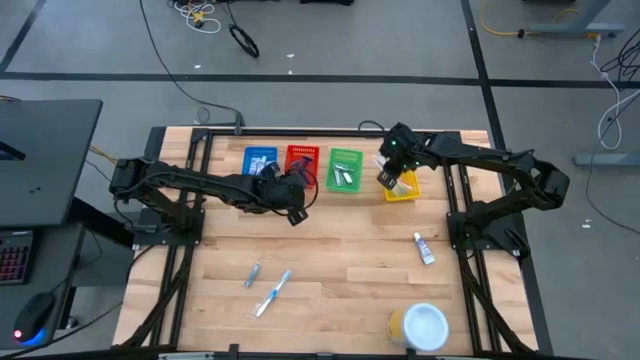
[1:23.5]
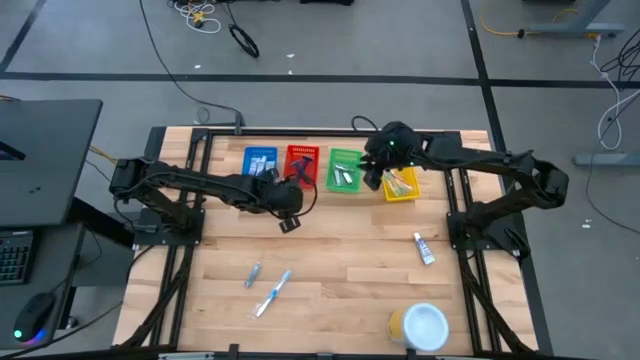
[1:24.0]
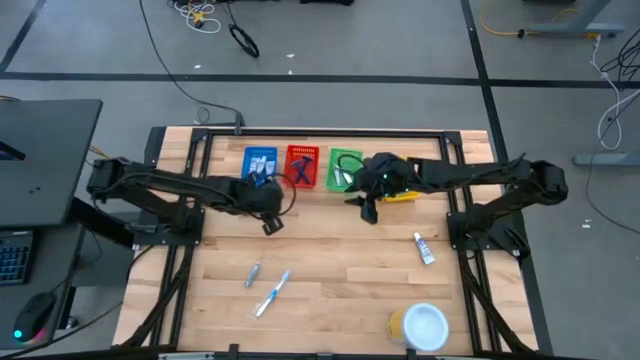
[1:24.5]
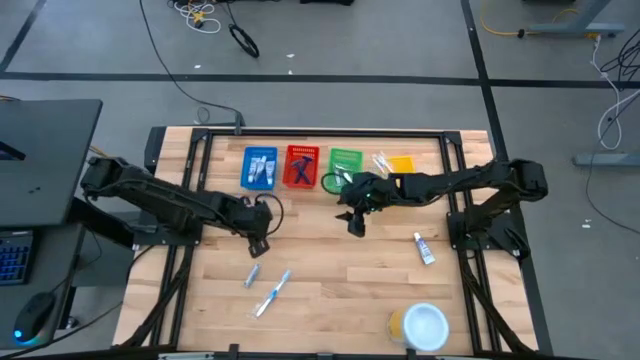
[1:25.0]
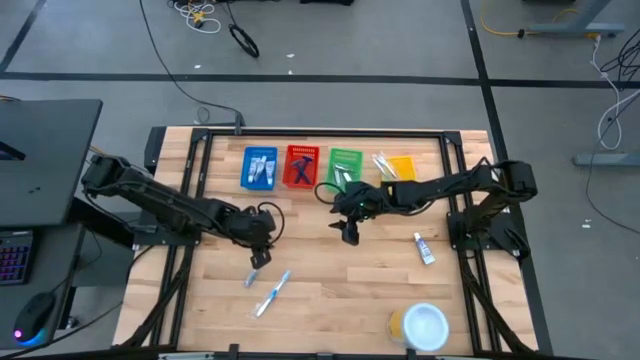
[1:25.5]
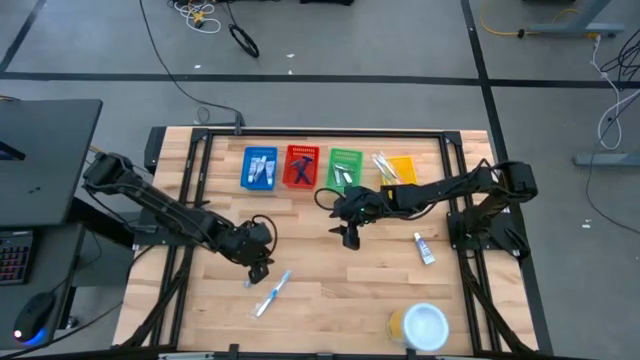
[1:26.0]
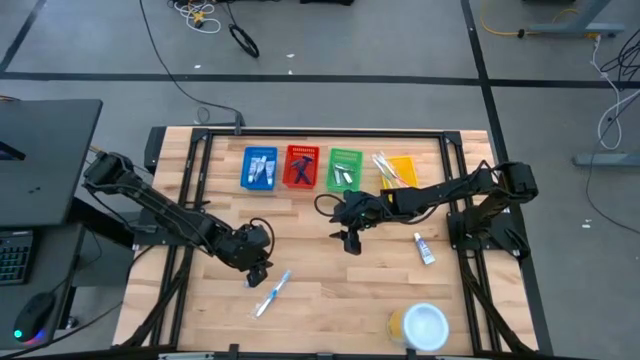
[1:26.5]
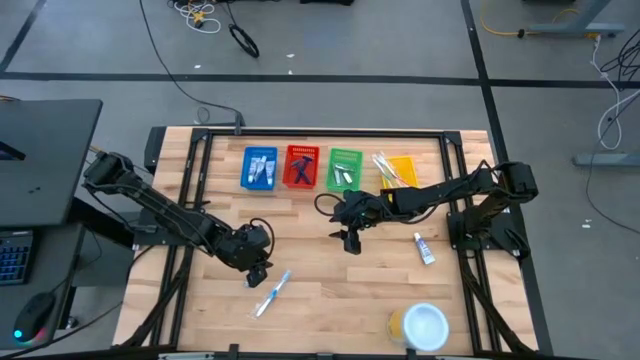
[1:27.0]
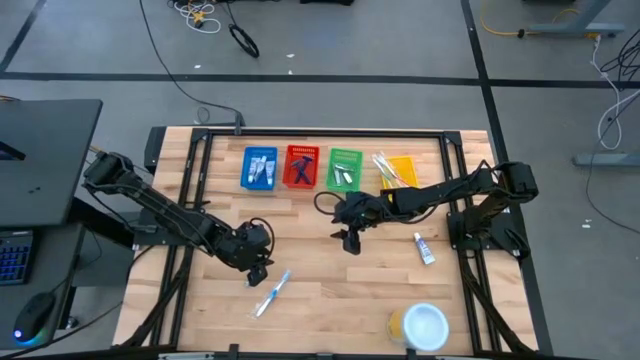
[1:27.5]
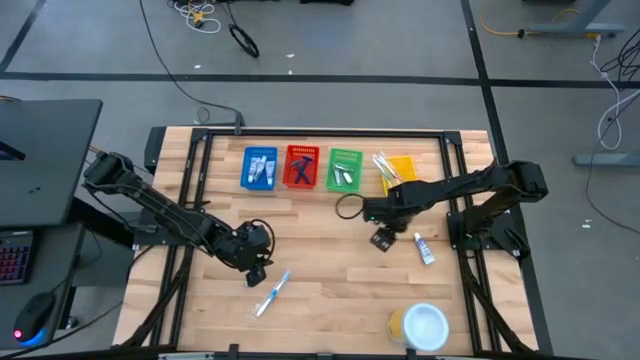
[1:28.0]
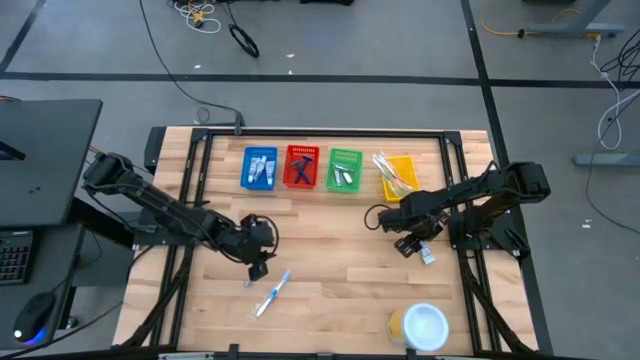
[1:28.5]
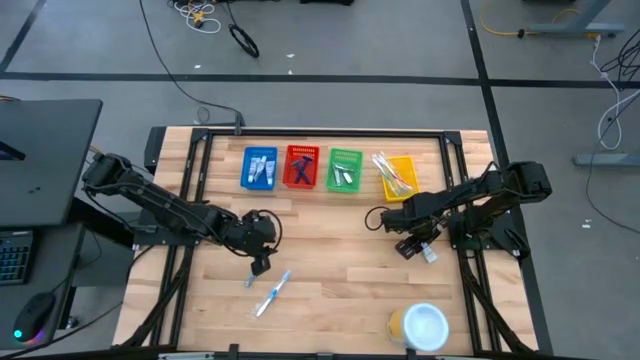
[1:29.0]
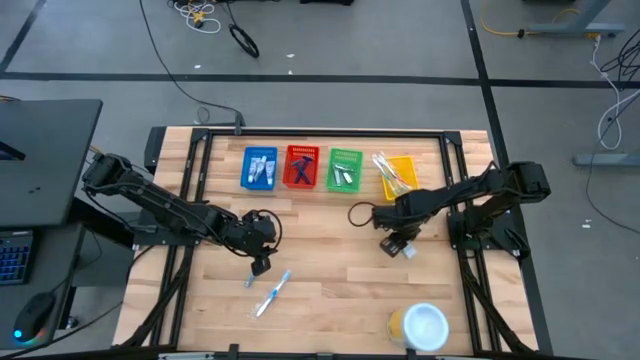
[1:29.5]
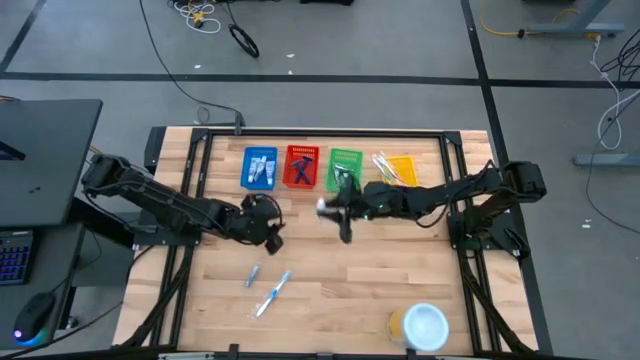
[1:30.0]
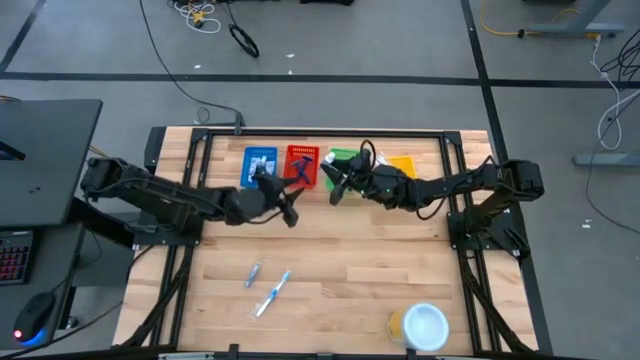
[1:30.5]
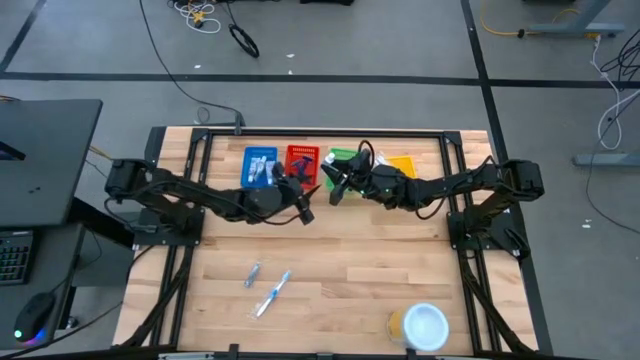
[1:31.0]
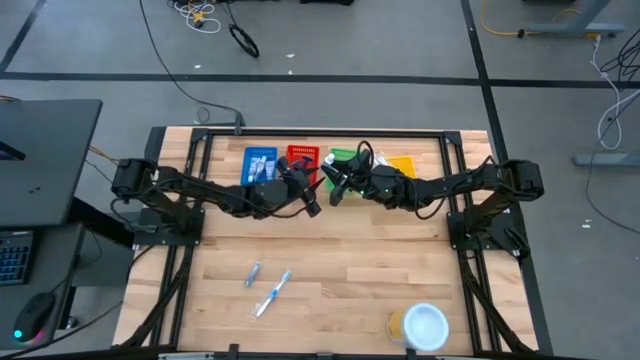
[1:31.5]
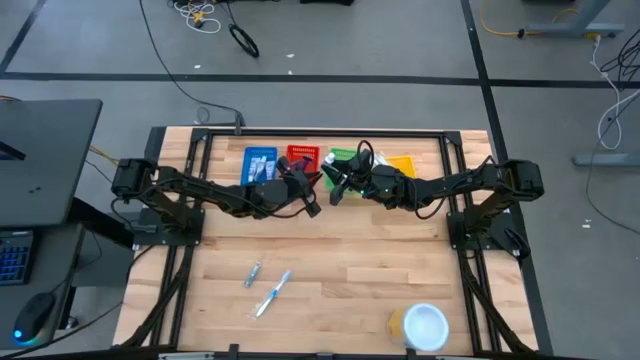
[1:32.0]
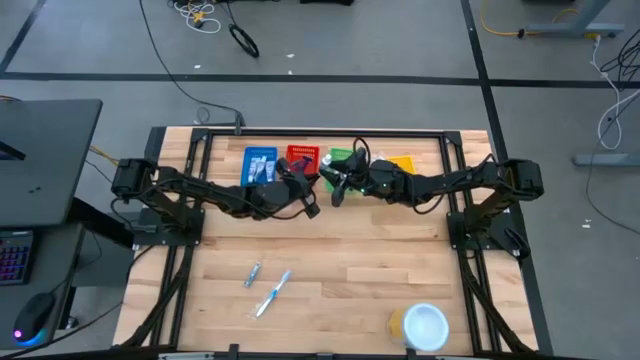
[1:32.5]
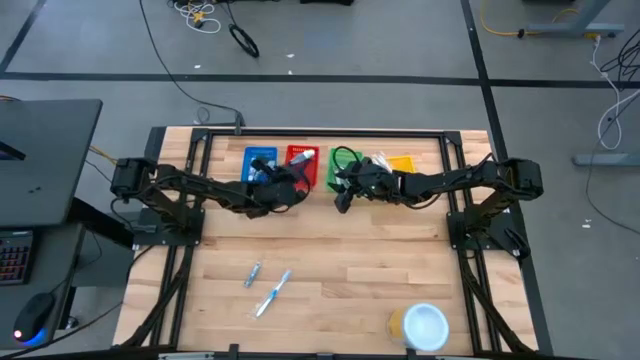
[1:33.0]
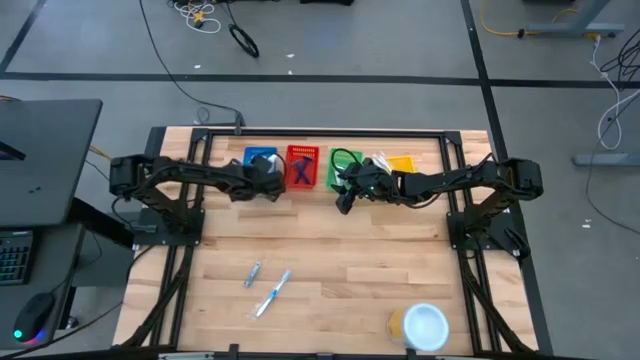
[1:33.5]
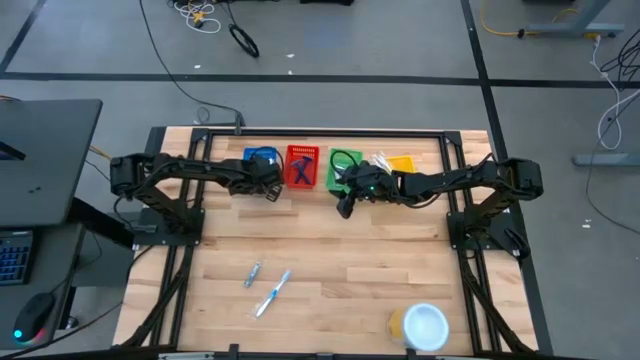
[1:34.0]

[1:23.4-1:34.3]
Task: Pick & Place Travel size toiletries
Put the white toothpaste into the blue bin

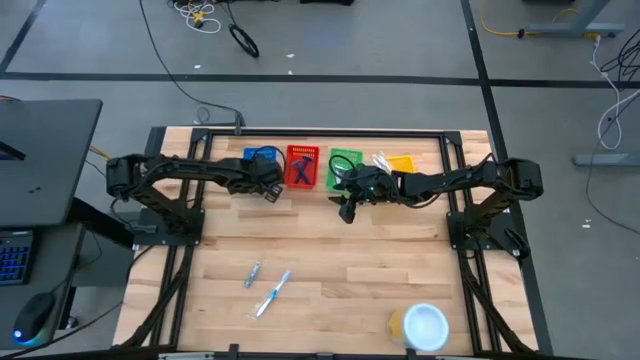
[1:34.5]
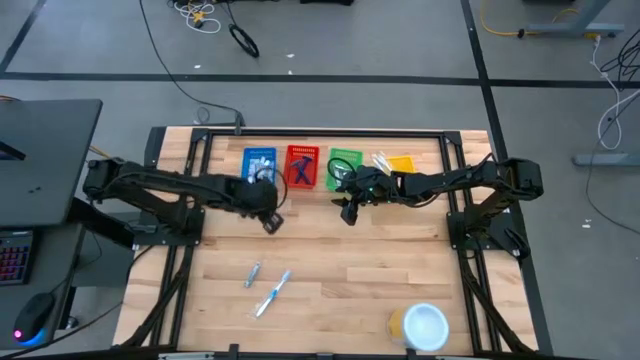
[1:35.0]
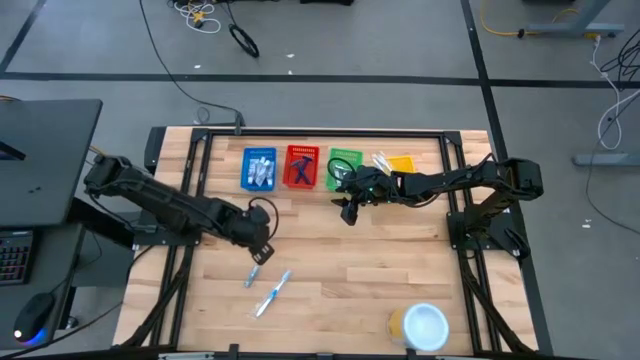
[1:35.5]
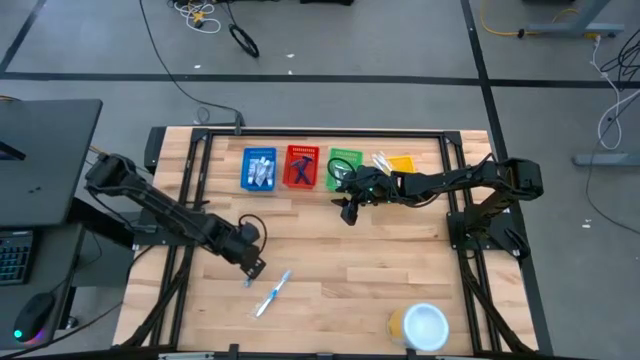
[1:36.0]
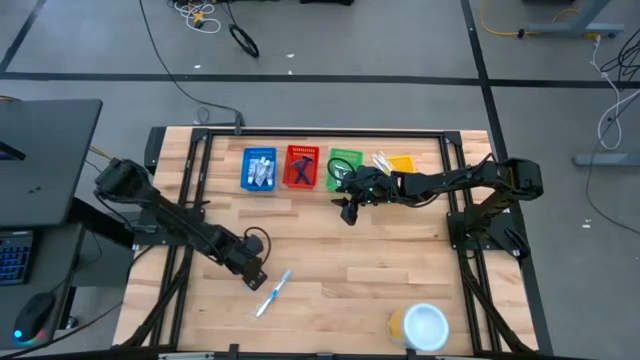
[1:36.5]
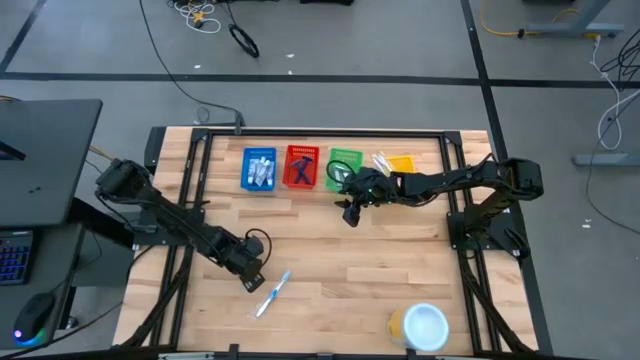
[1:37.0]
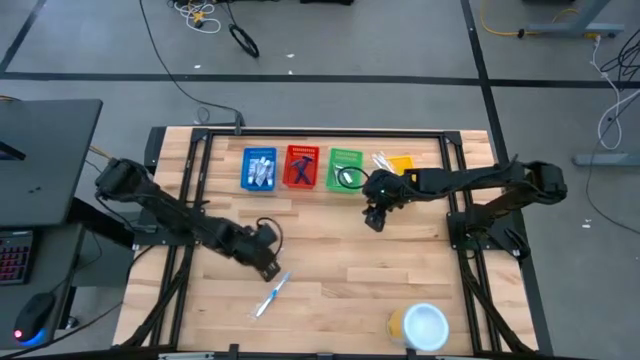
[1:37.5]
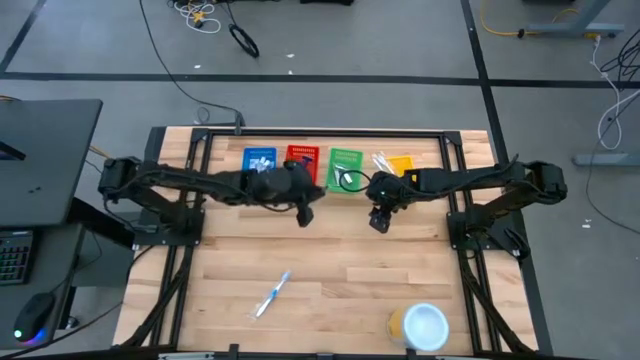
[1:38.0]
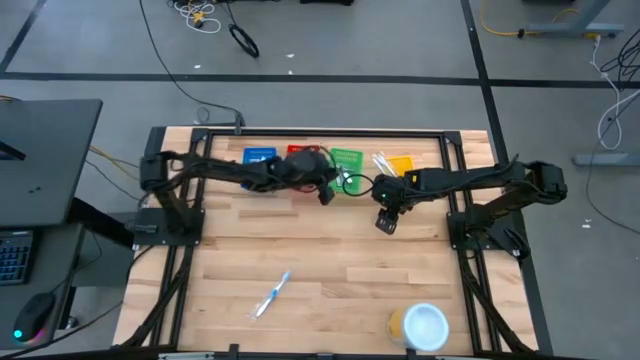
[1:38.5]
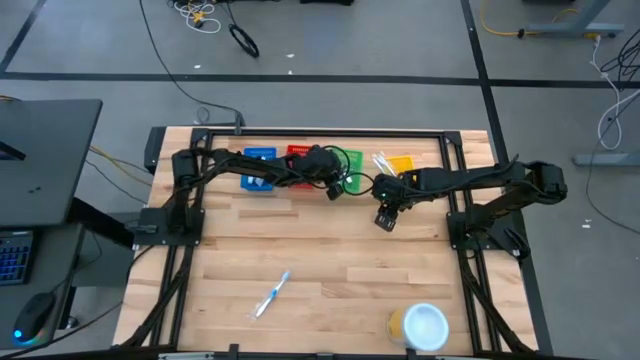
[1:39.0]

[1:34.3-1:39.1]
Put the silver nail cutter into the green bin

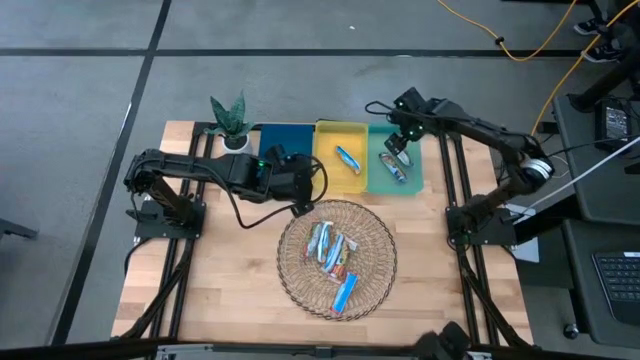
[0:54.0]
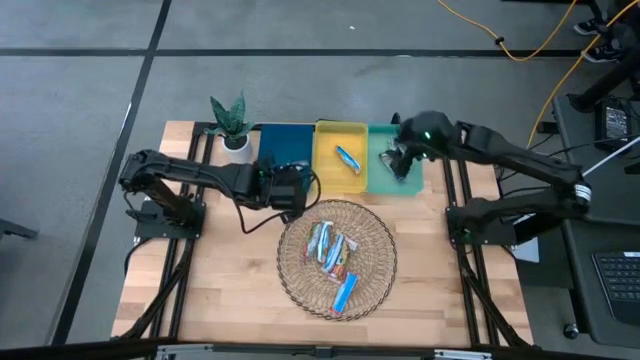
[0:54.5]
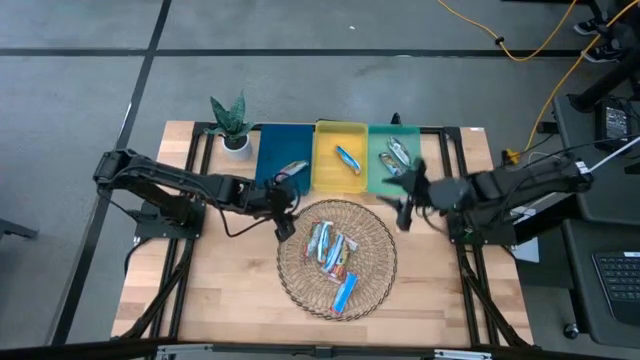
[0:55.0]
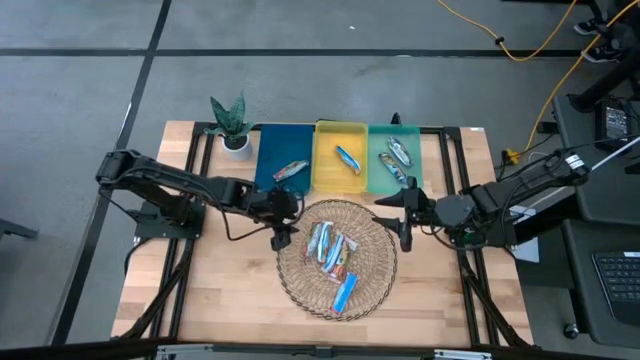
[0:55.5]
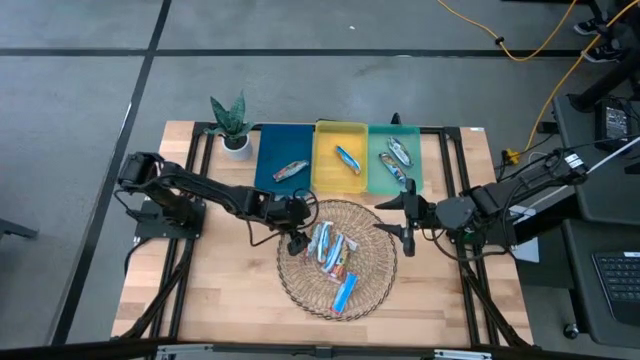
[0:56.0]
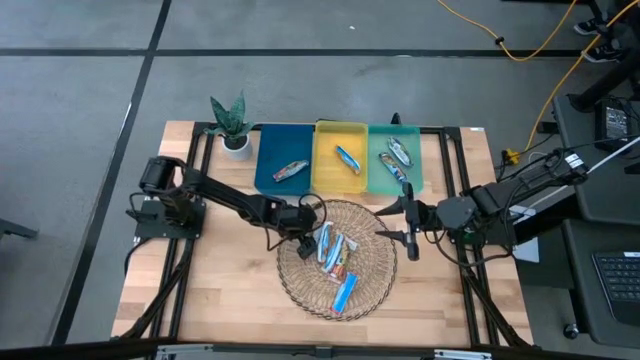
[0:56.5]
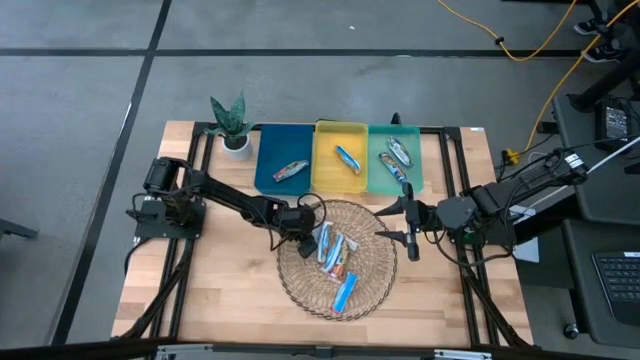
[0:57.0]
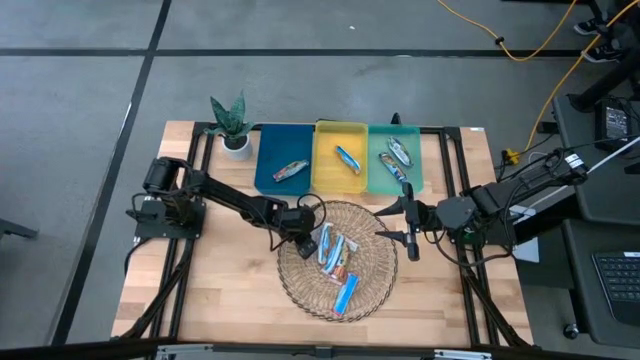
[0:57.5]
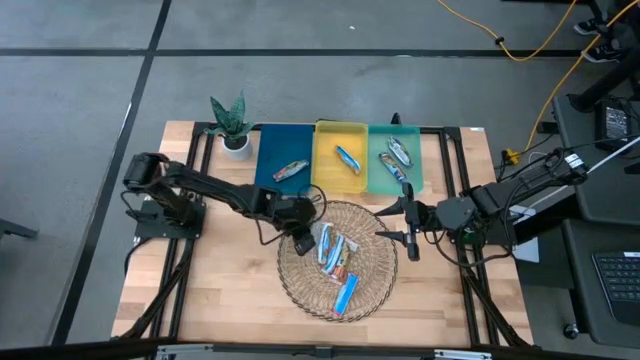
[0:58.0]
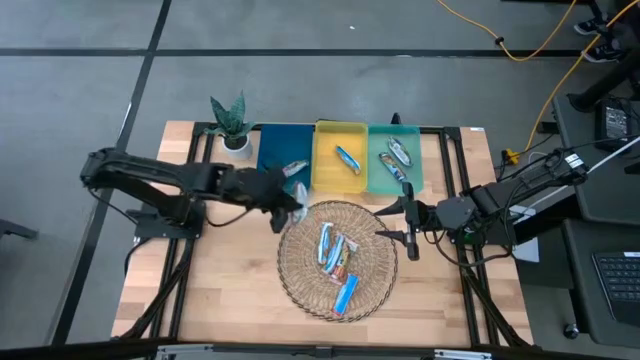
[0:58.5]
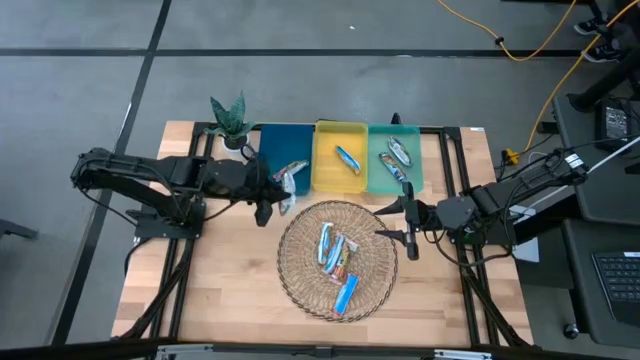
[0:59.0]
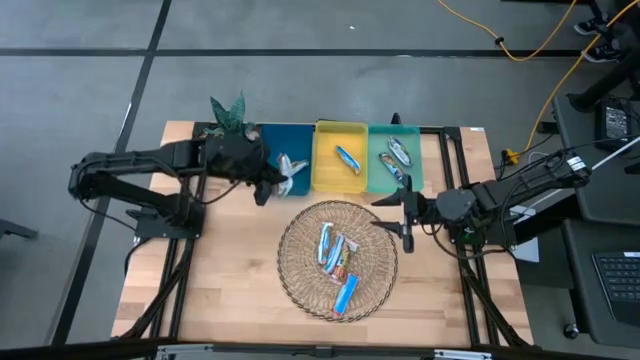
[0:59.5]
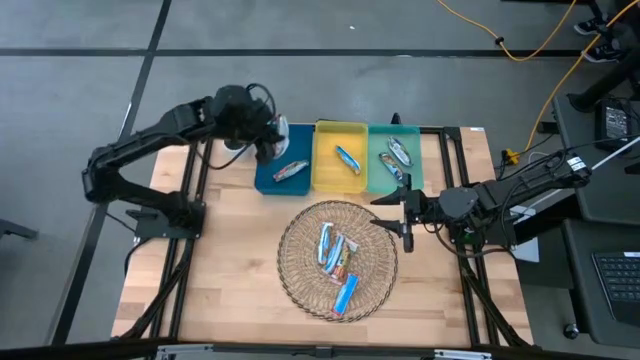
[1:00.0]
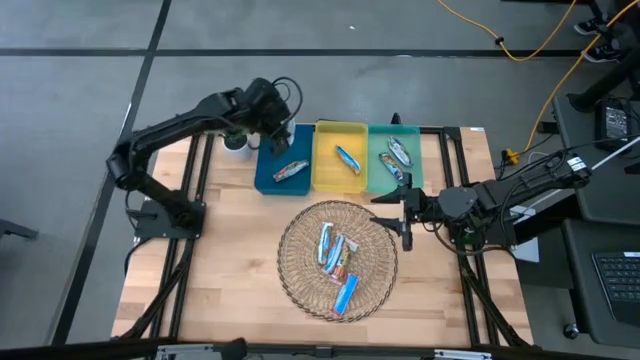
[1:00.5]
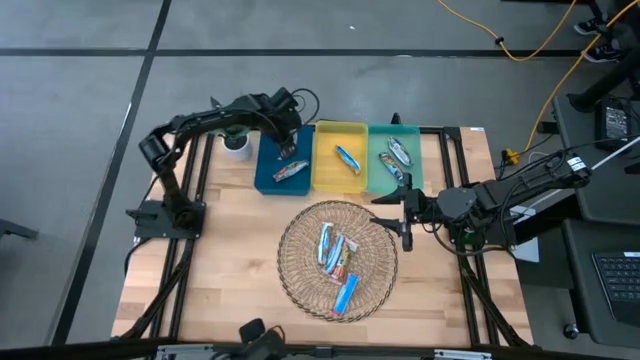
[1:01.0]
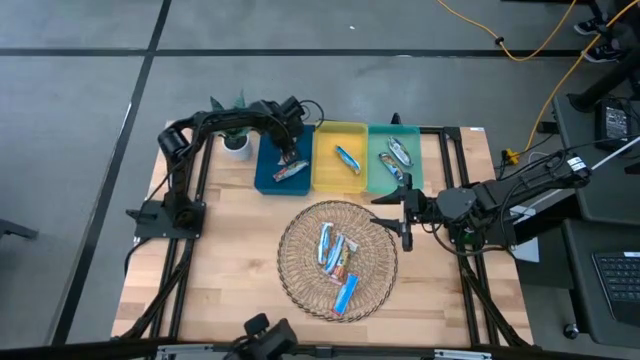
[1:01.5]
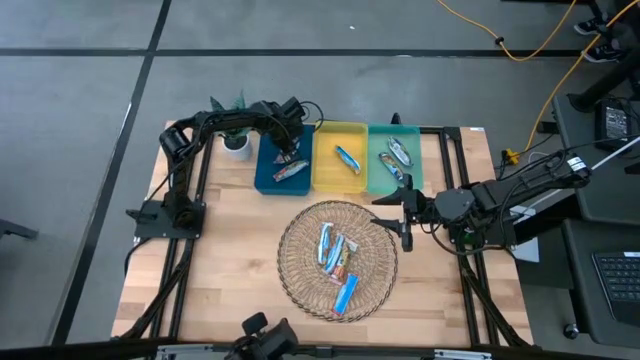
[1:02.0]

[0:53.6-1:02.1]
Task: Pick and place Granola Bars by type
Put the red granola bar into the blue bin
